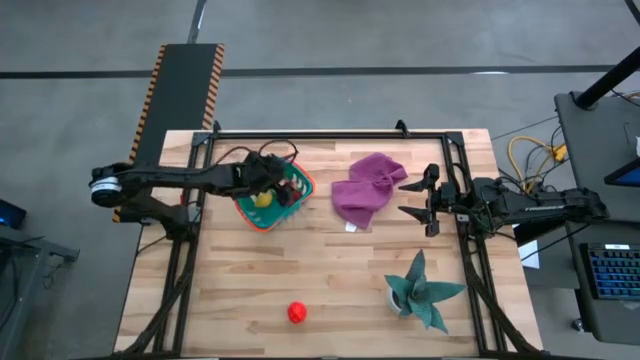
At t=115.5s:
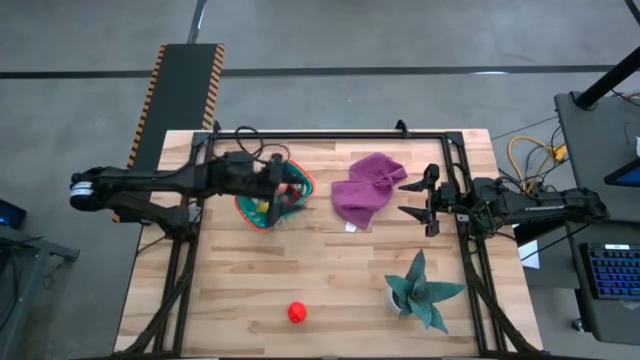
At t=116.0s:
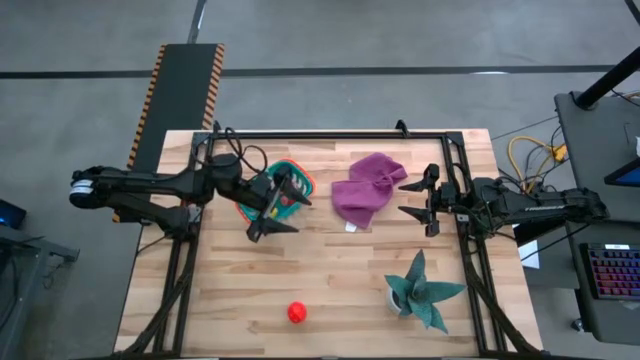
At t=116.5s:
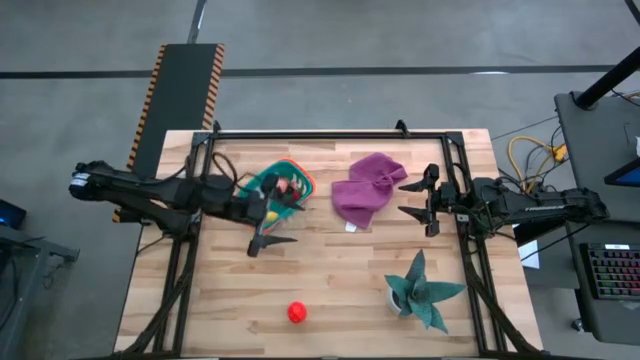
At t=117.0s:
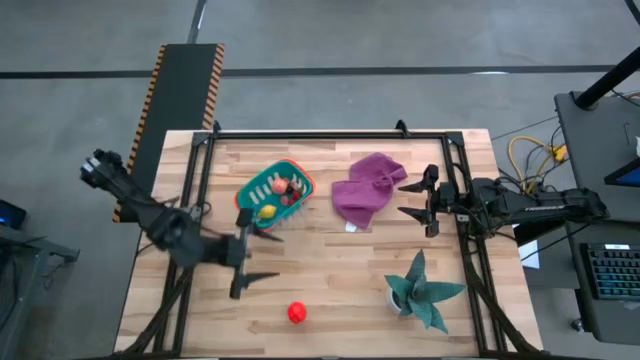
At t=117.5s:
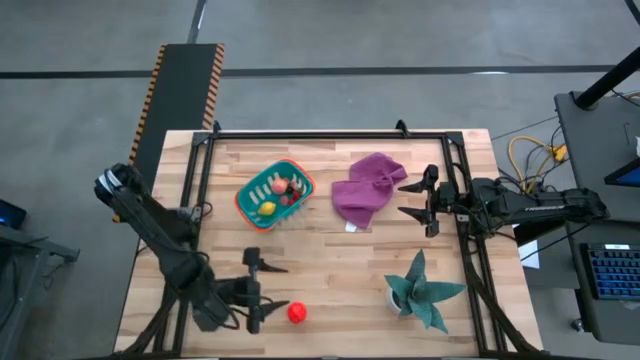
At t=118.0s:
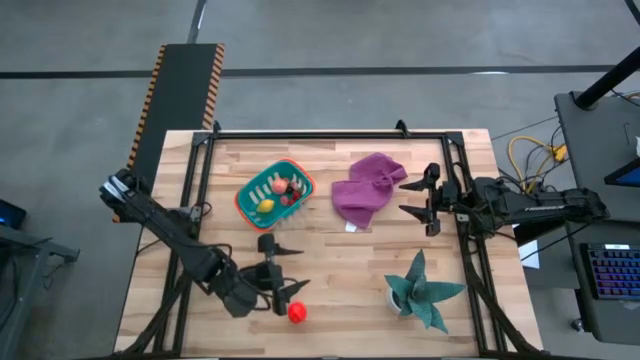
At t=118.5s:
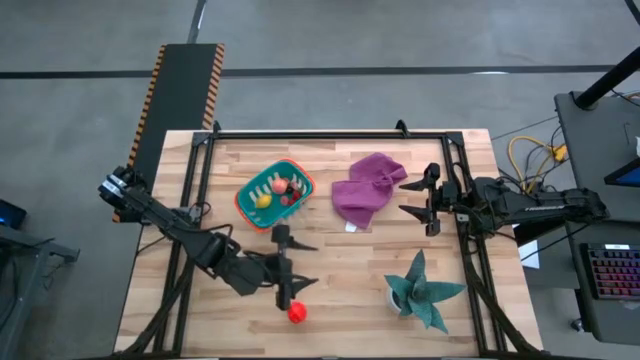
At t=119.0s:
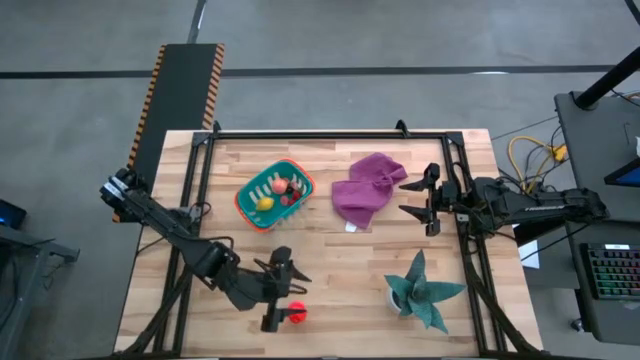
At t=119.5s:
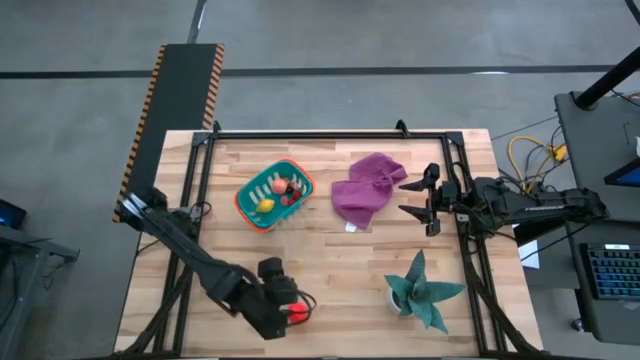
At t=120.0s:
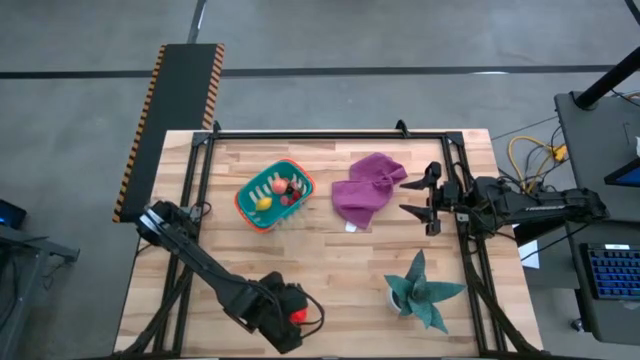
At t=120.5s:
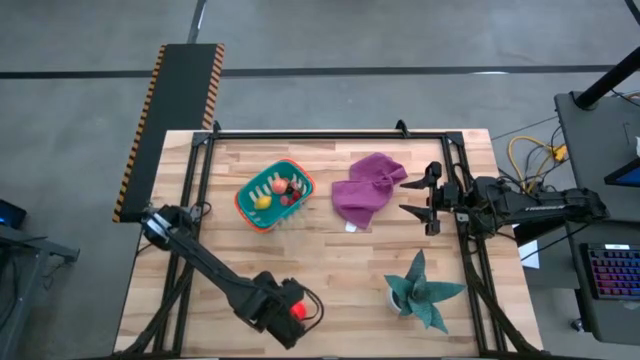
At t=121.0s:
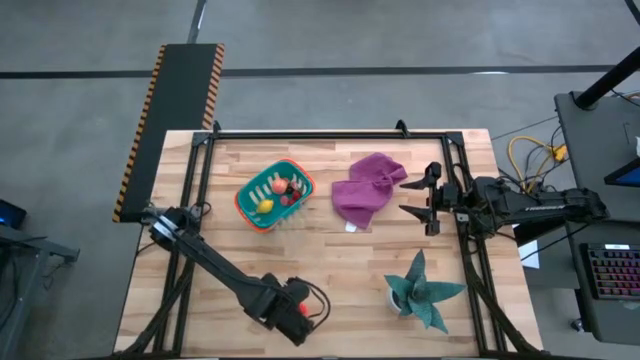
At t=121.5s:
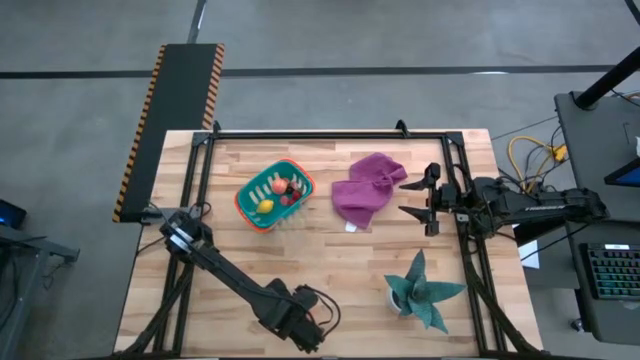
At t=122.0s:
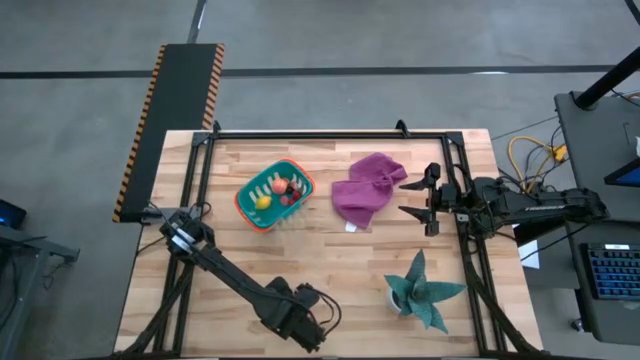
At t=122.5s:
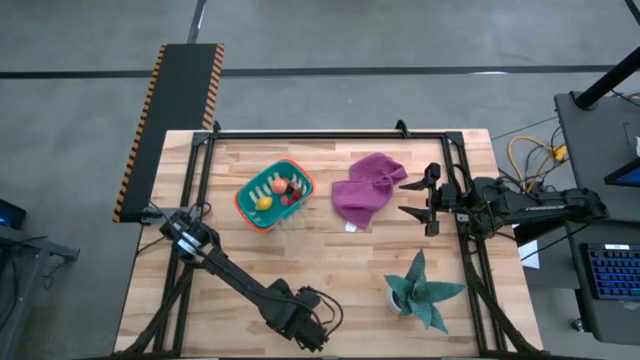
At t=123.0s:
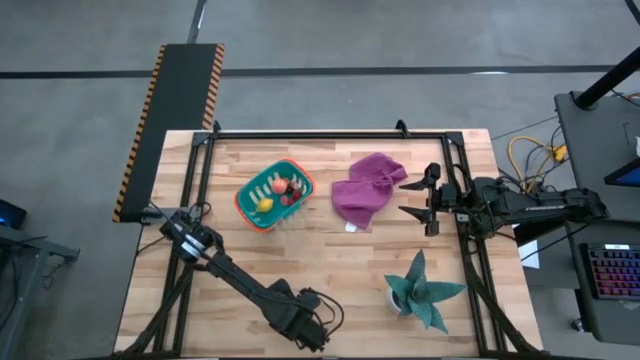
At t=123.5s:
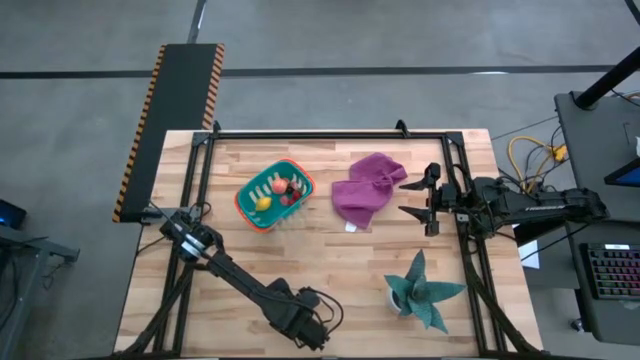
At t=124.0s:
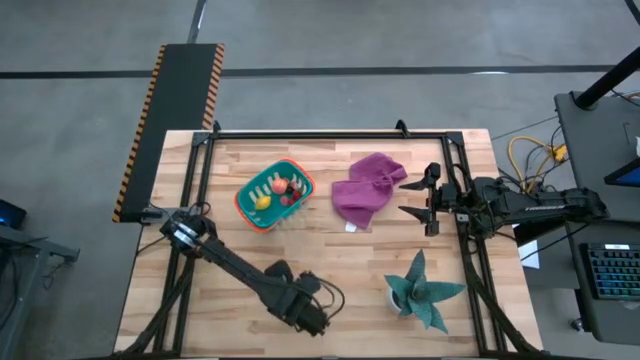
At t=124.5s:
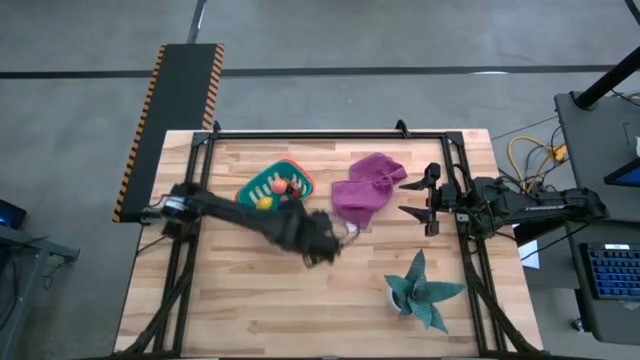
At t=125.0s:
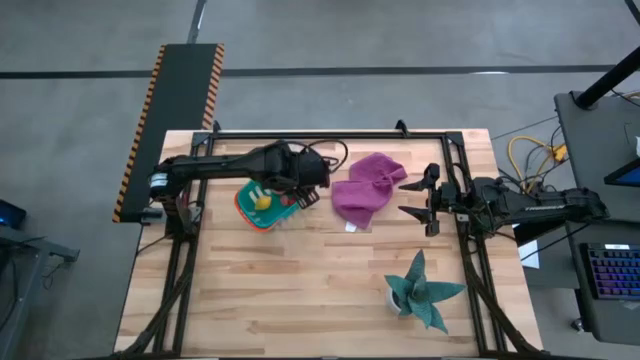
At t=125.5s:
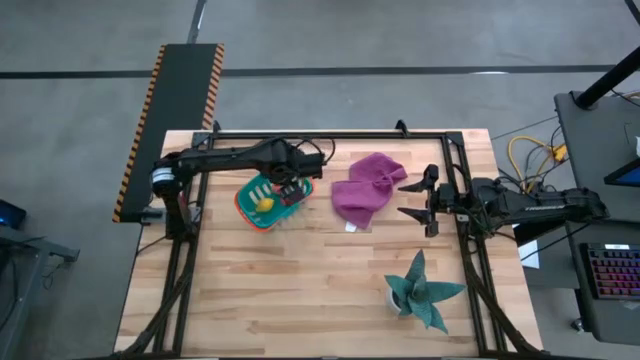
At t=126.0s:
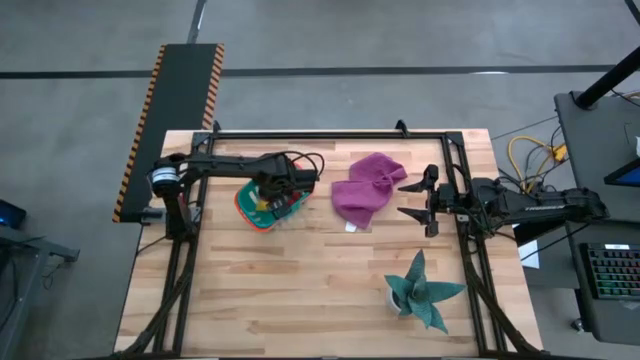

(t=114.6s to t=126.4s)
Task: Pick and placing Produce into tupperware
Put the red apple into the blue basket

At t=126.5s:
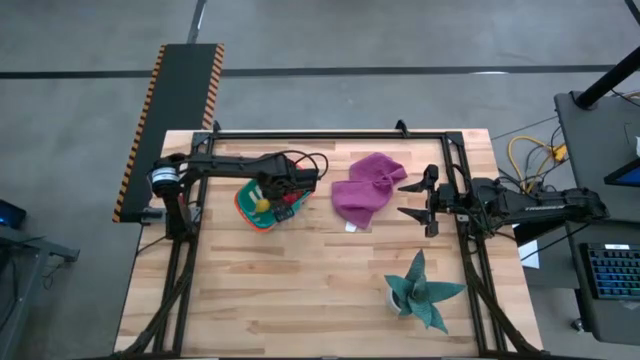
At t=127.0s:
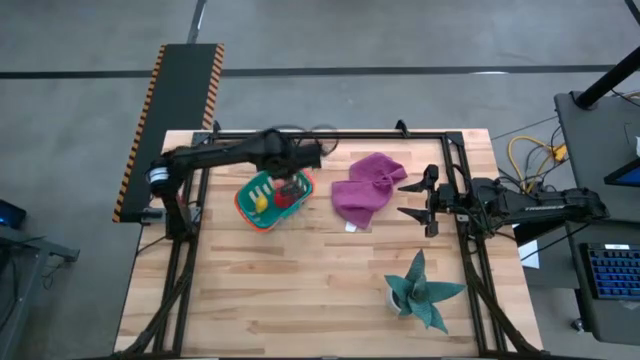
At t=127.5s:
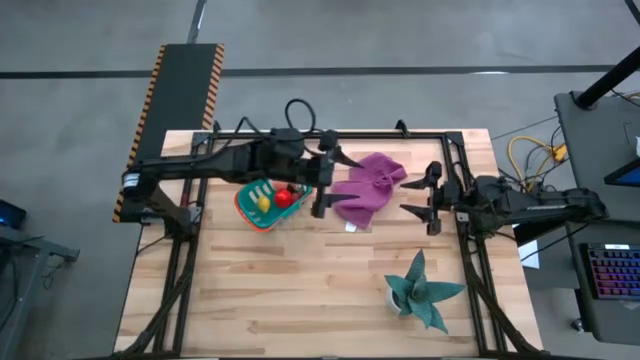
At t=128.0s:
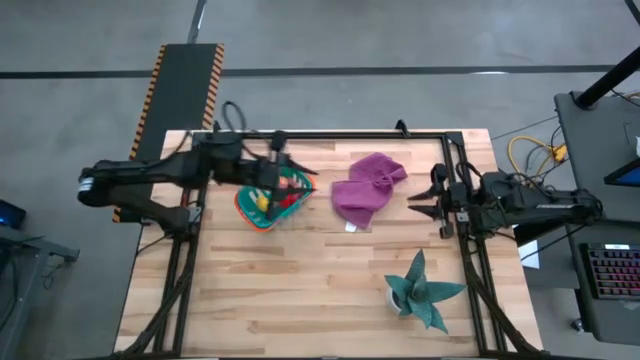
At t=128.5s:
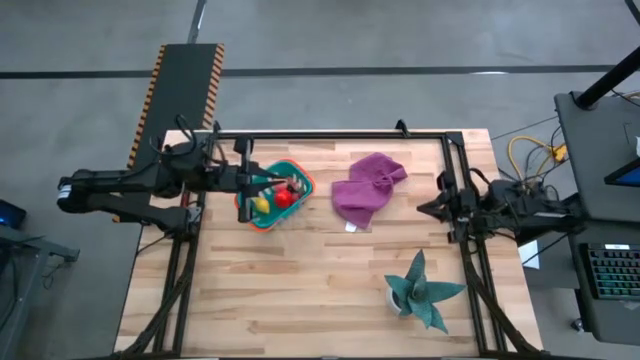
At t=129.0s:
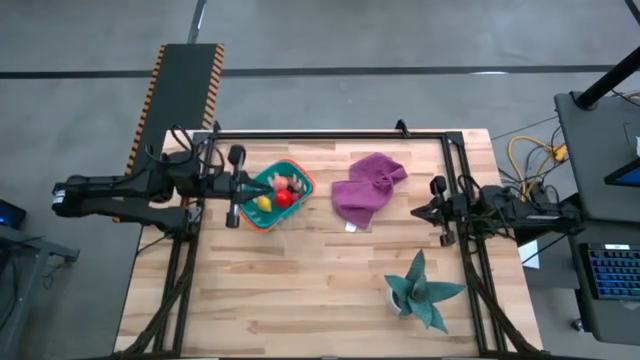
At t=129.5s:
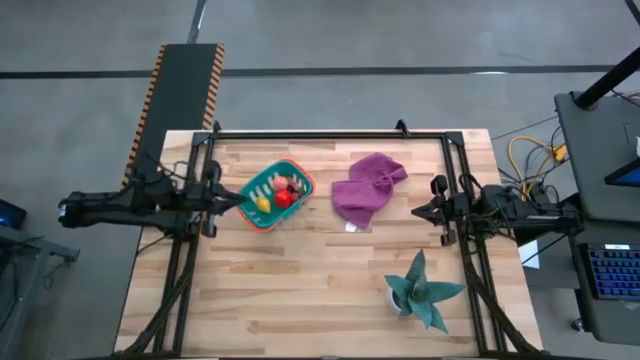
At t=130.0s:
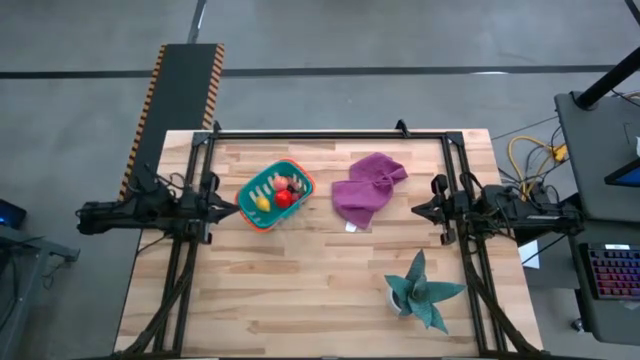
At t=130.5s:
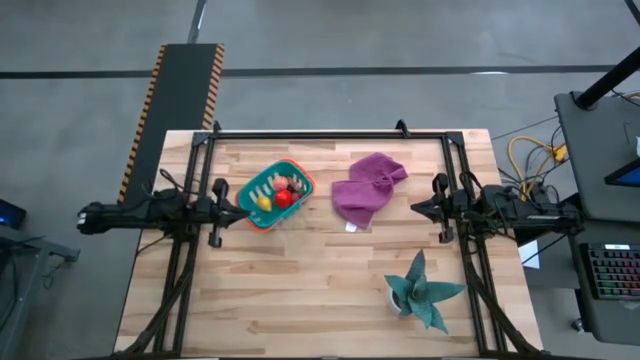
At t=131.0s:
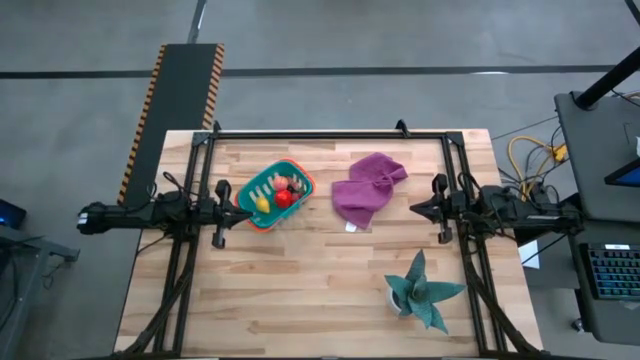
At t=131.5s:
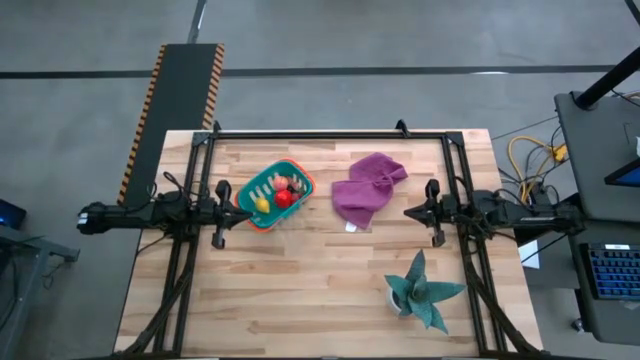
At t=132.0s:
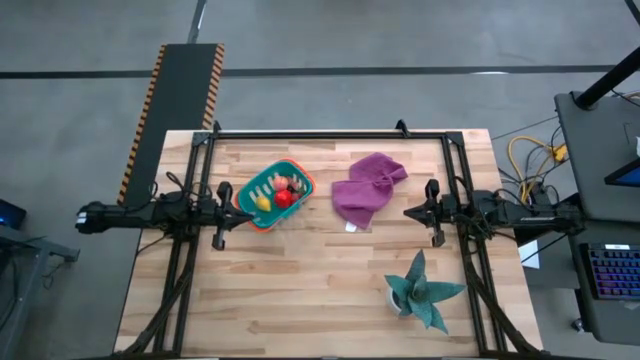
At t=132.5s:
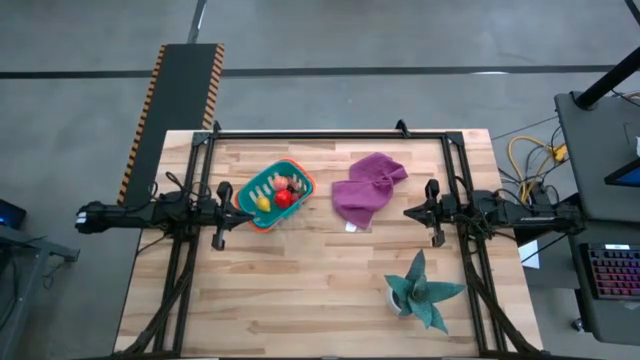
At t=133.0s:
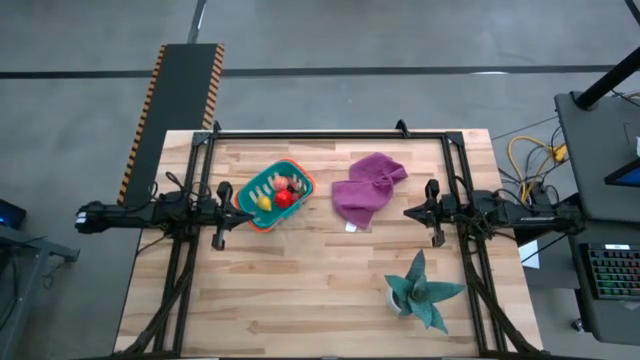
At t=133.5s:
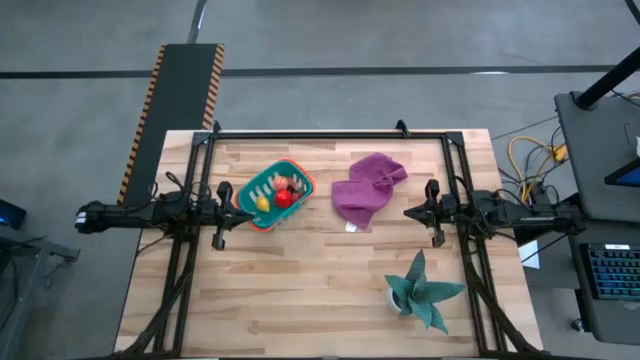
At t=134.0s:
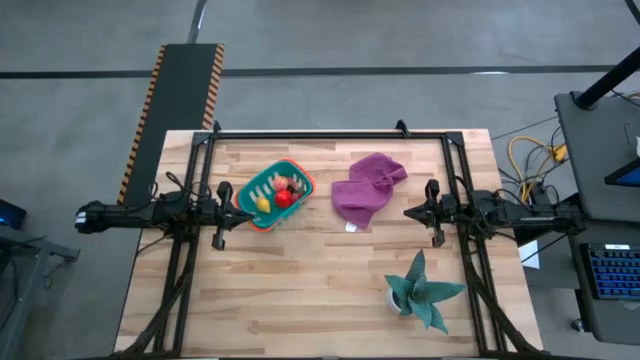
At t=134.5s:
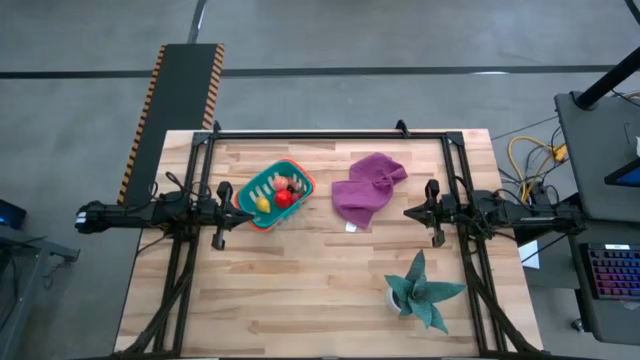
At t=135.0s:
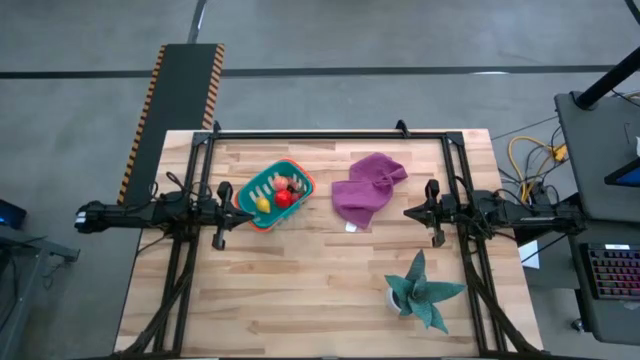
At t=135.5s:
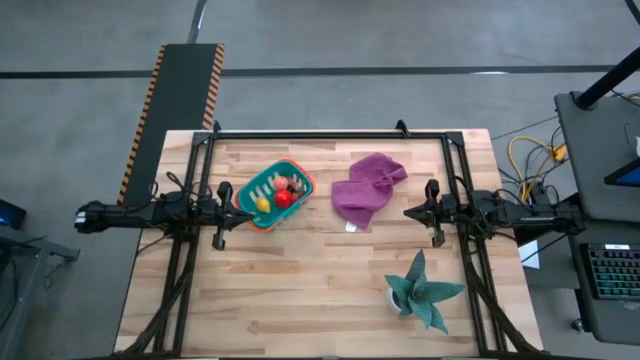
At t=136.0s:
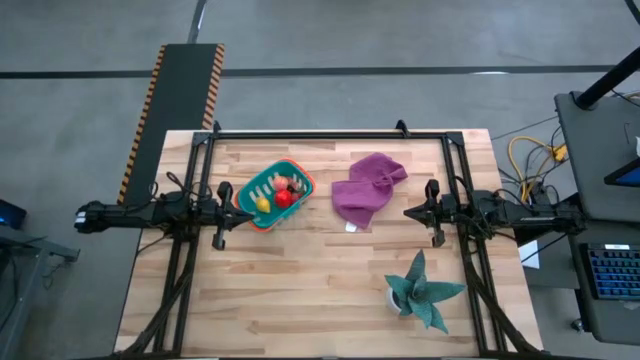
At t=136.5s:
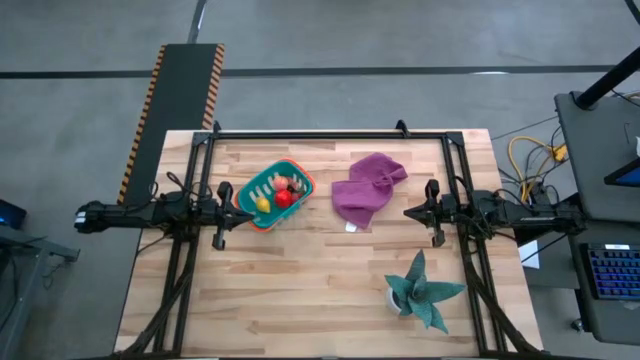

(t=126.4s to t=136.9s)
Return to Home Position
